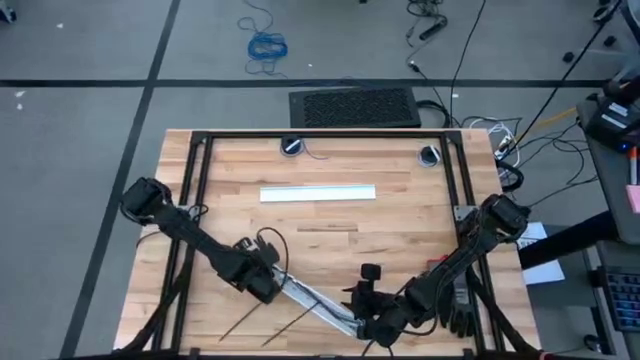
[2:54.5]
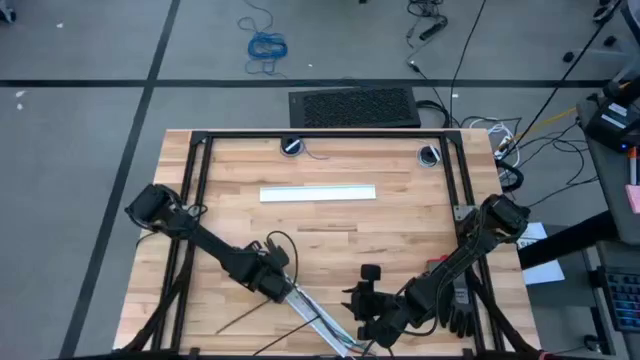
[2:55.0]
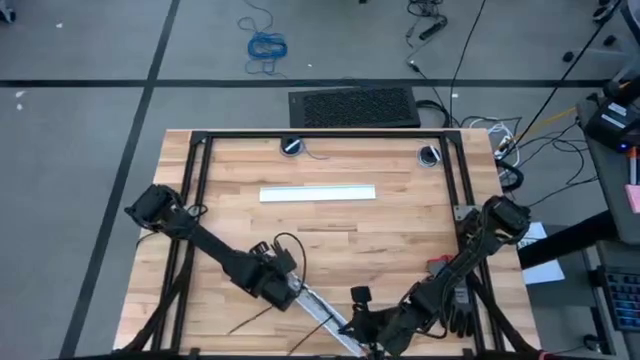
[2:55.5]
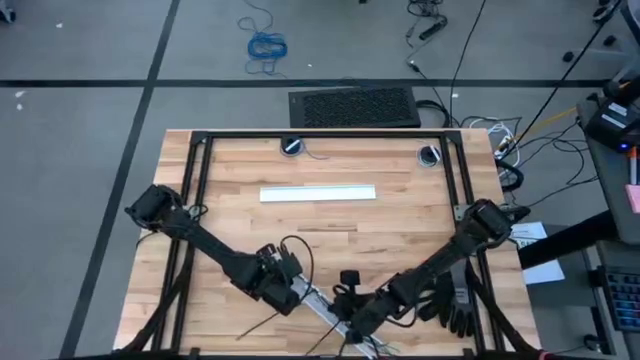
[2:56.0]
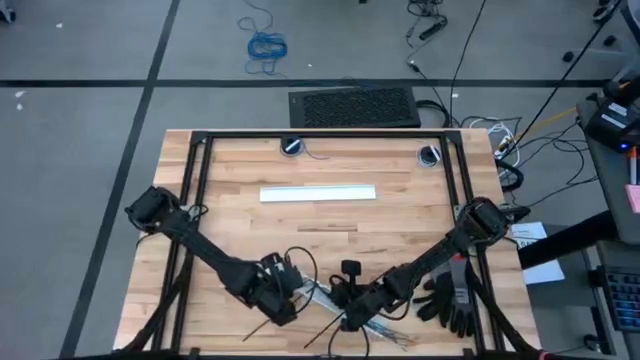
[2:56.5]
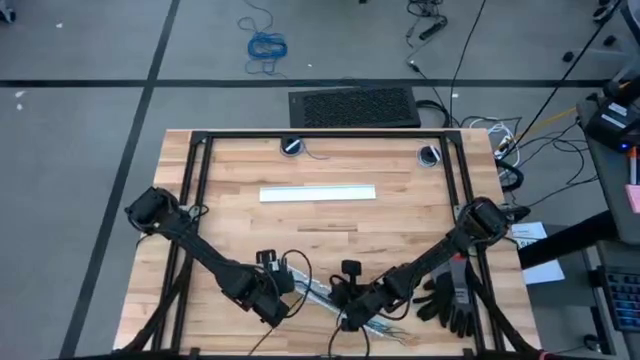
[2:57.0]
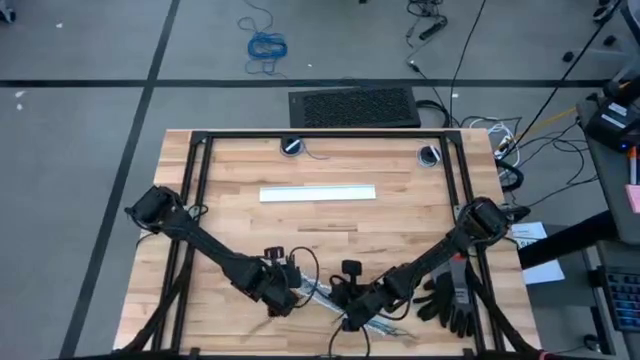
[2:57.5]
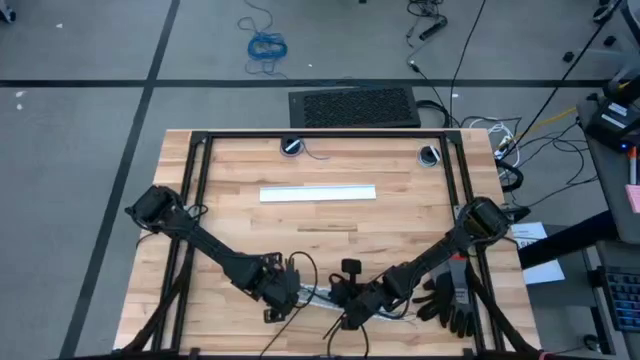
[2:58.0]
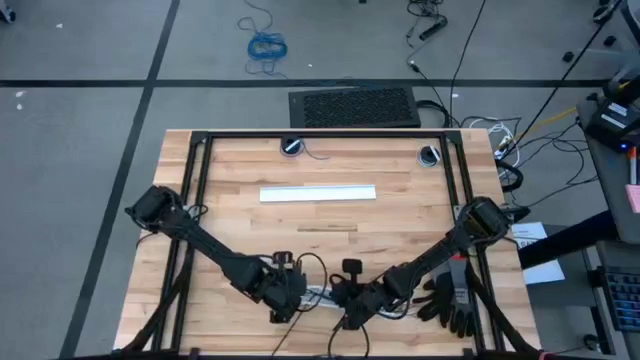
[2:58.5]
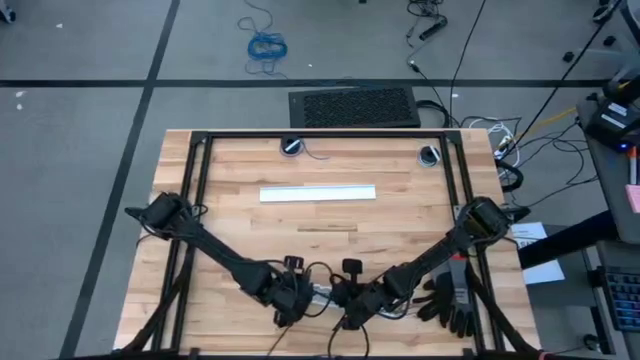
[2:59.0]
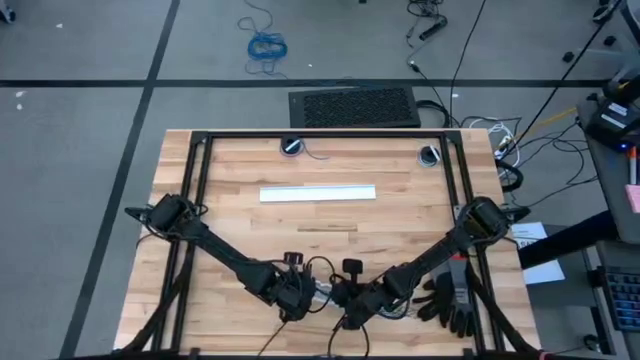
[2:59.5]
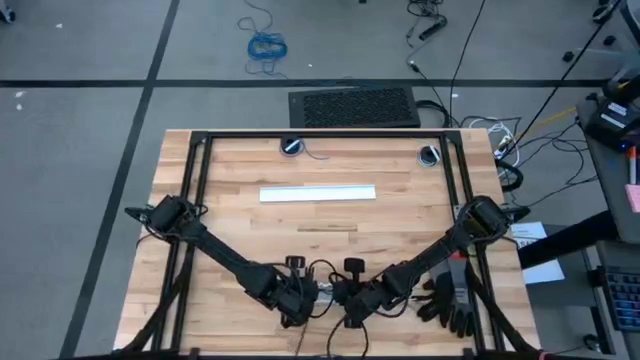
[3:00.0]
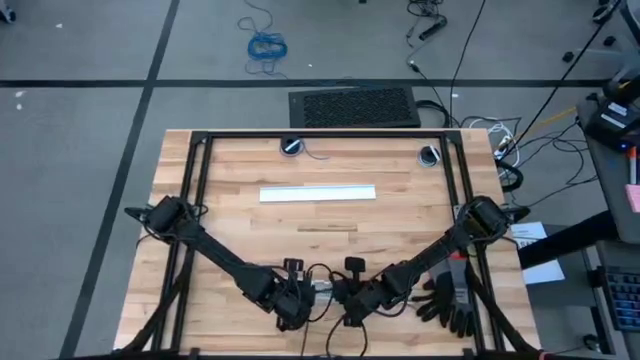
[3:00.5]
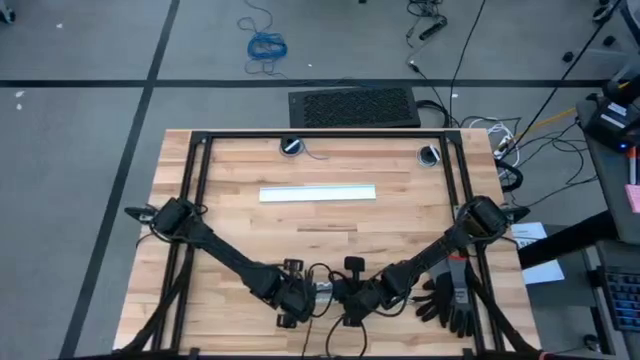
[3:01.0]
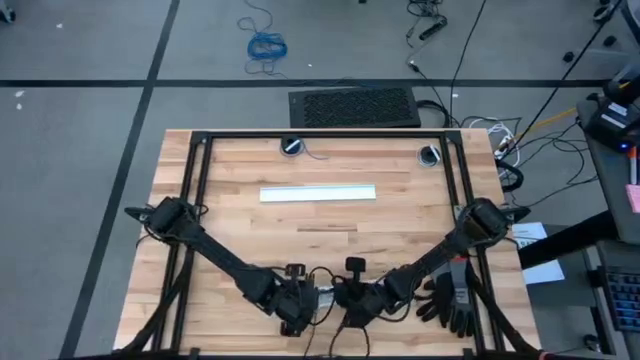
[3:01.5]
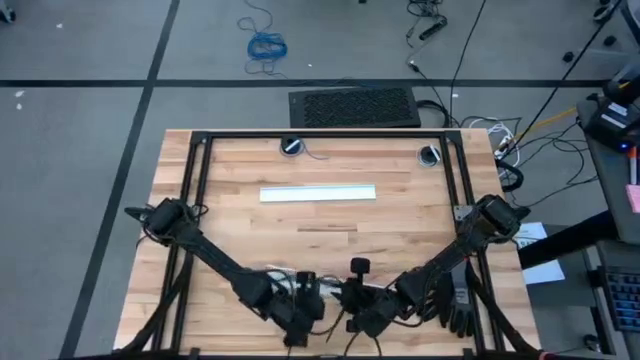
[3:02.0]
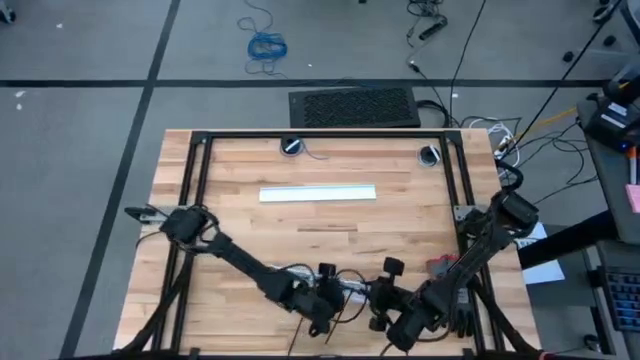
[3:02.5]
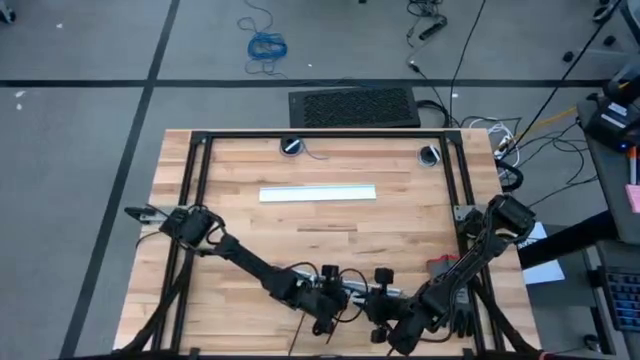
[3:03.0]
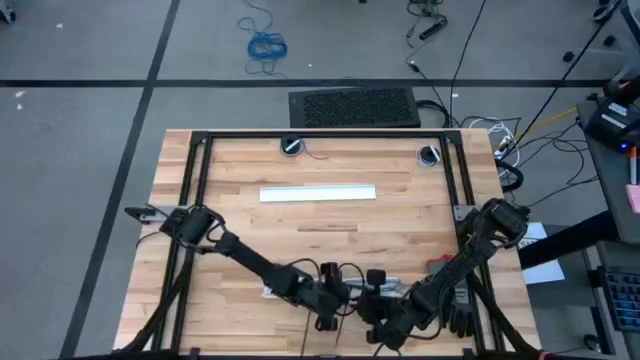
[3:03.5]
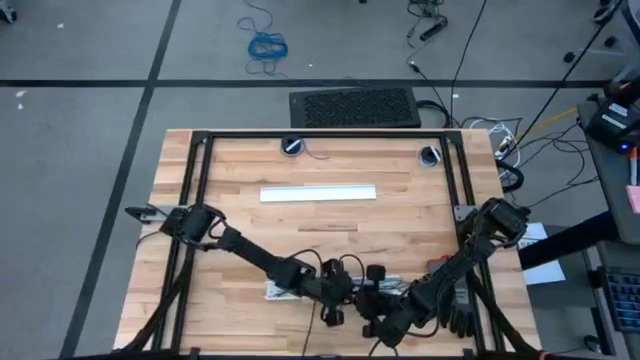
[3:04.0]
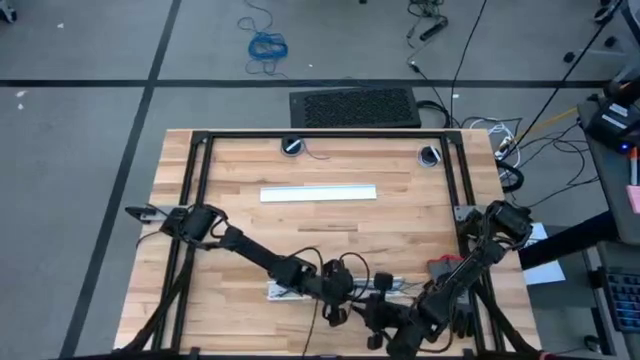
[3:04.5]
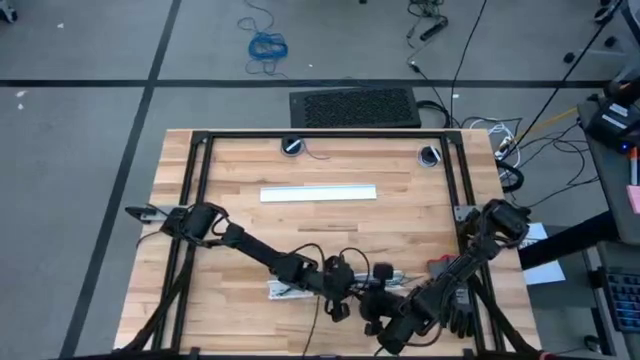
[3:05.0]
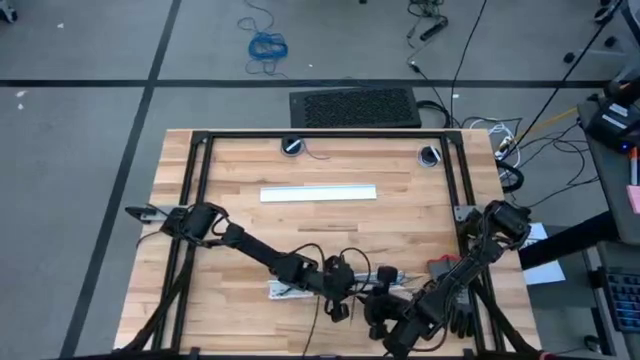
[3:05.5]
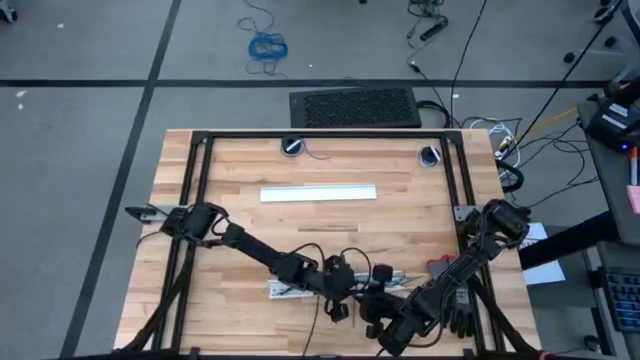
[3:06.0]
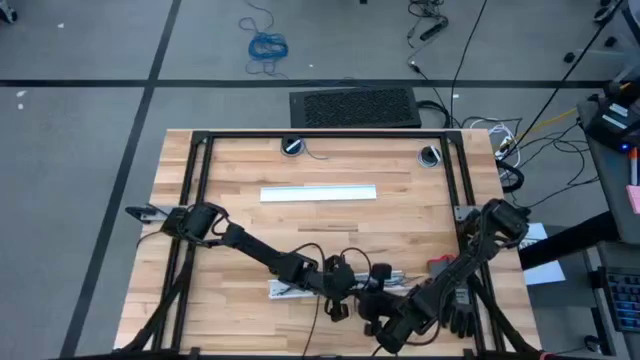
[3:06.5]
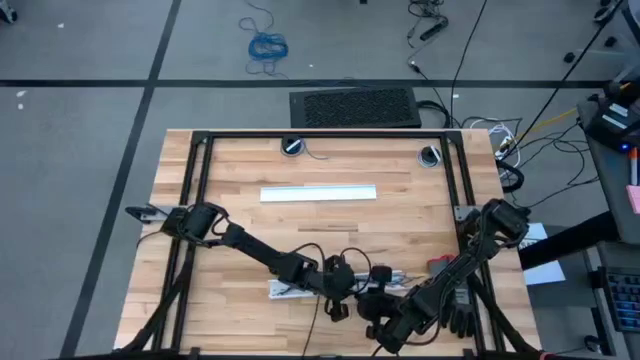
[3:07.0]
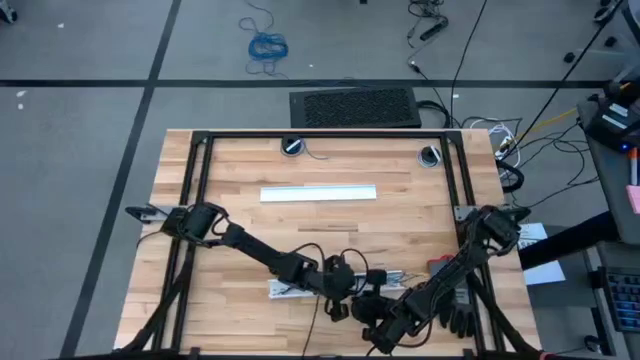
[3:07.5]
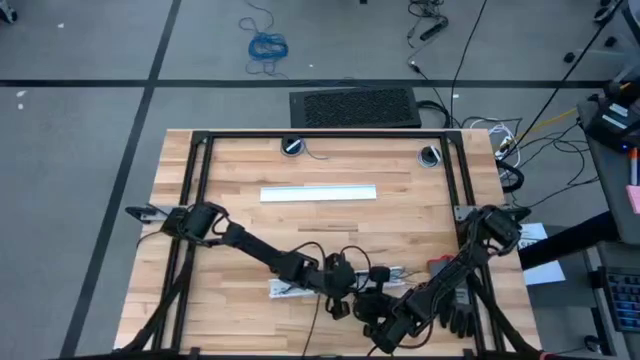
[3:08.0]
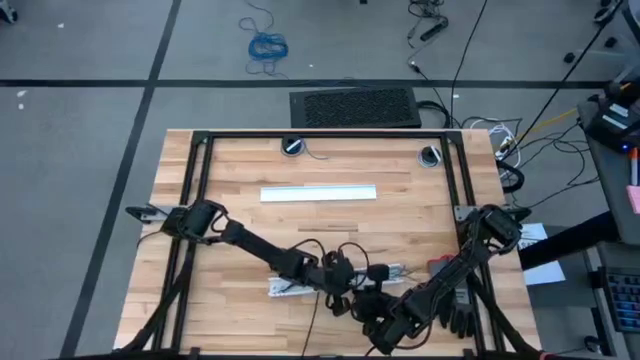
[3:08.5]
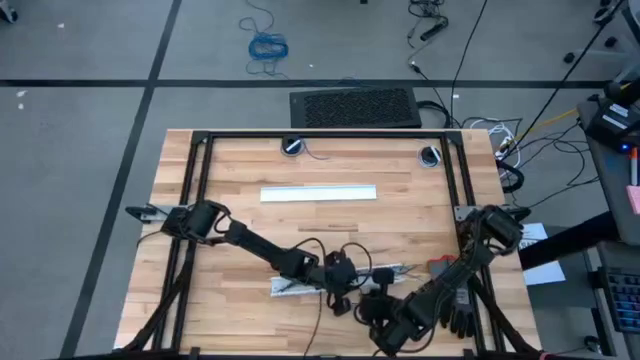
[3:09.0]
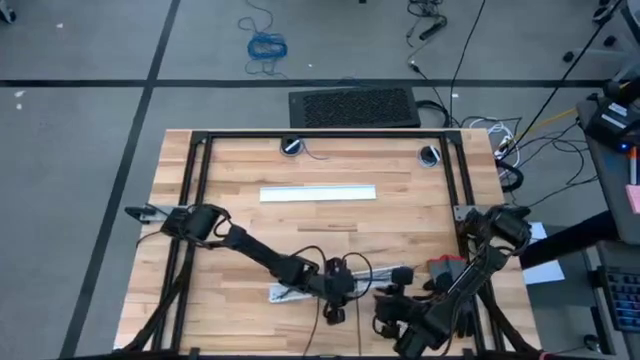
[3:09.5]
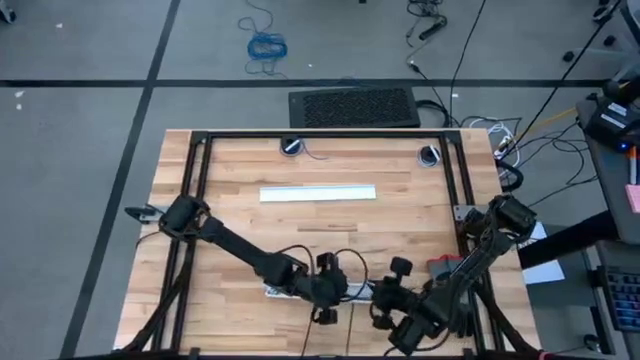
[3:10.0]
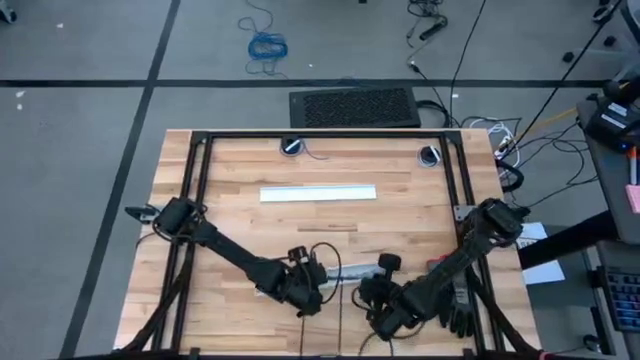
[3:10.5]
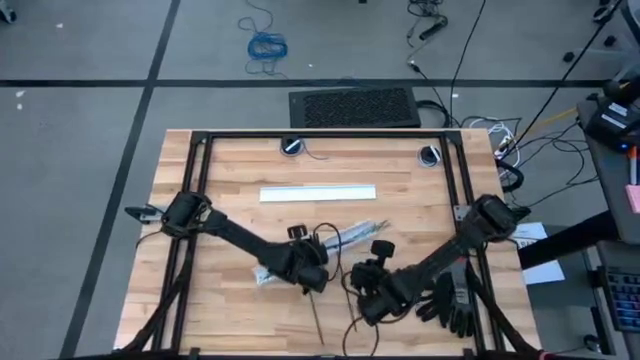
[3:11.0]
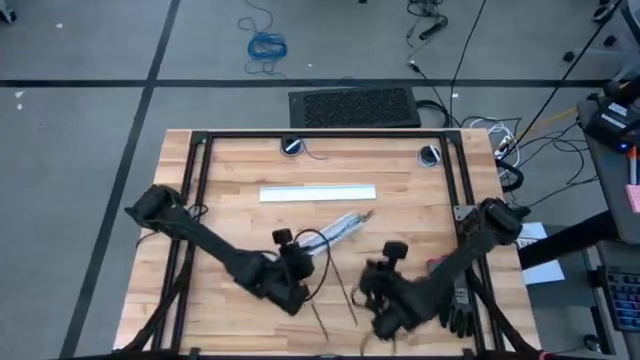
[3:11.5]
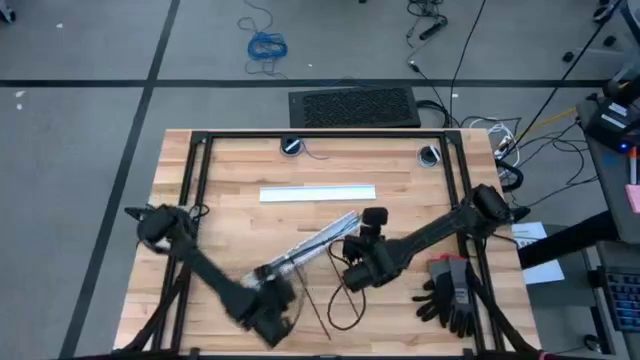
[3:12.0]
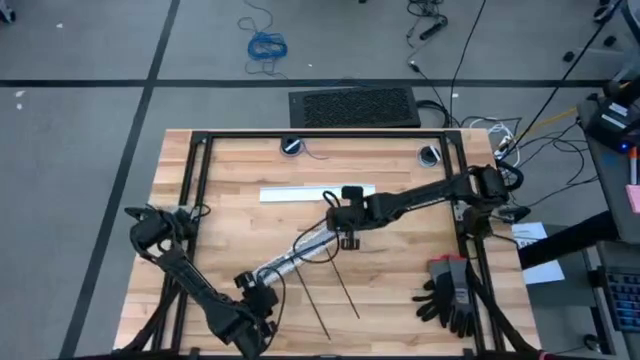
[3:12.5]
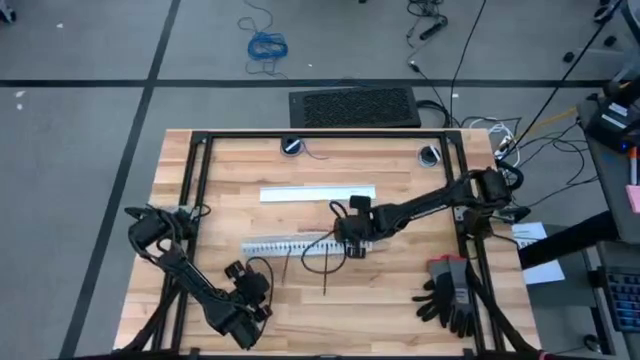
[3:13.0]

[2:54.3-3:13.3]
Task: Ziptie cables
Put the ziptied cables into the cable duct

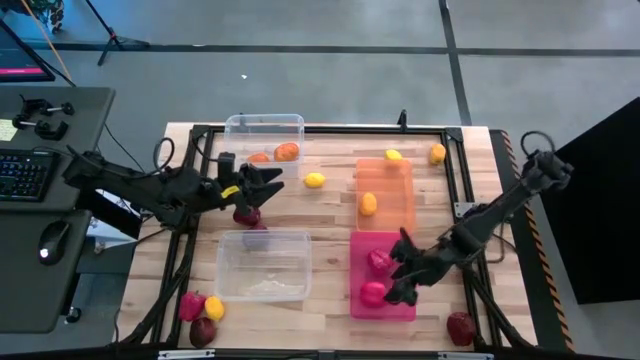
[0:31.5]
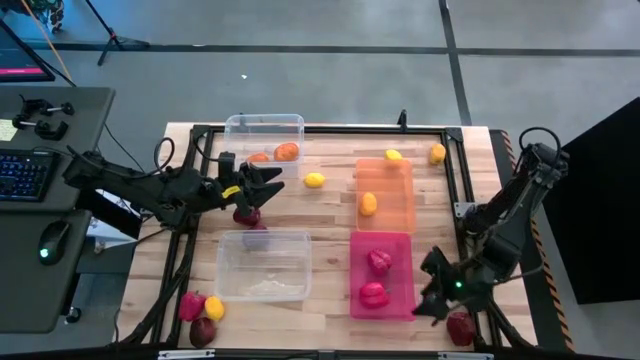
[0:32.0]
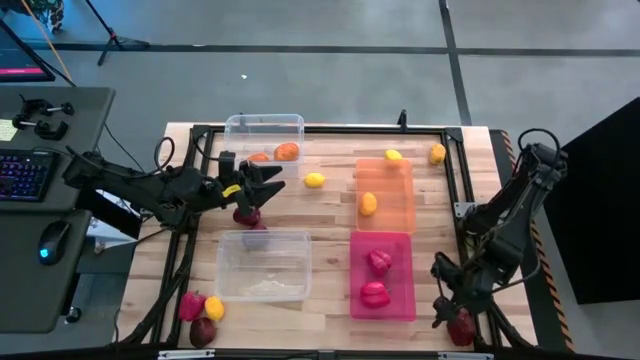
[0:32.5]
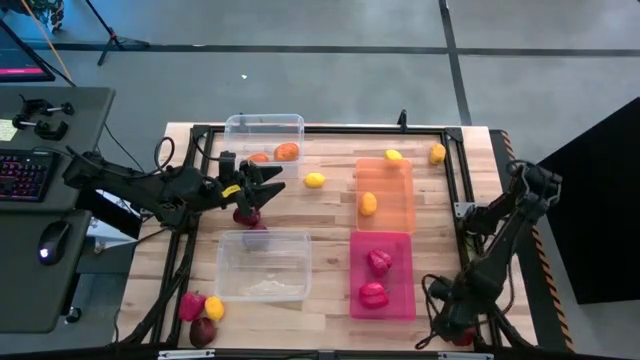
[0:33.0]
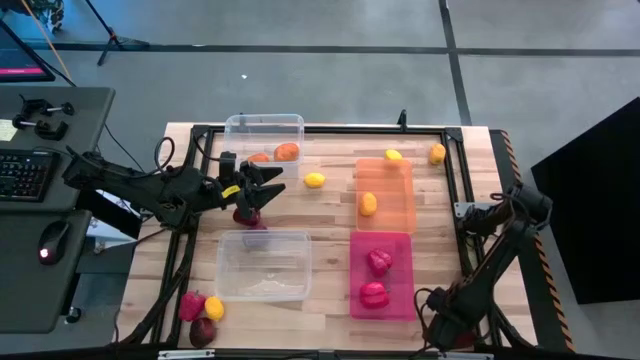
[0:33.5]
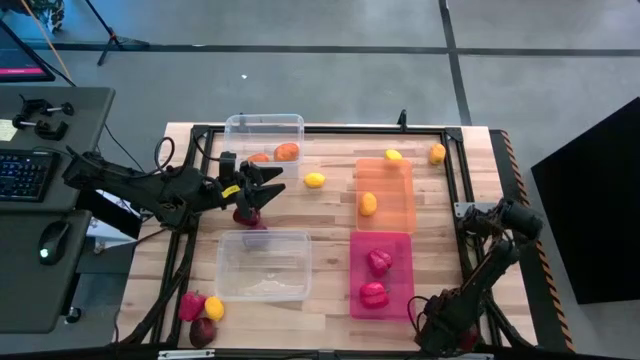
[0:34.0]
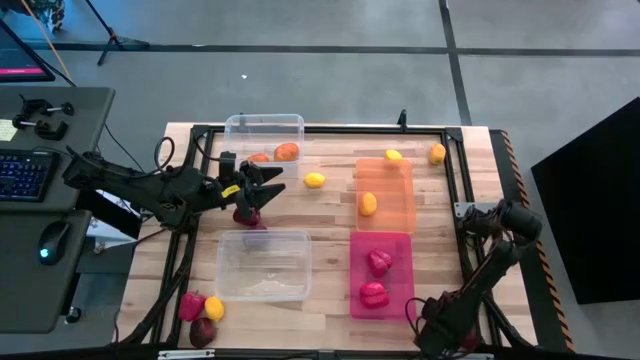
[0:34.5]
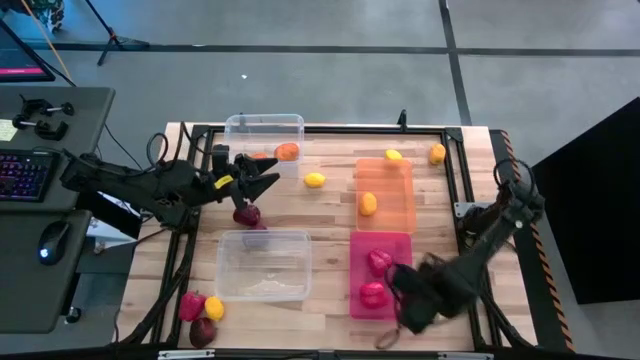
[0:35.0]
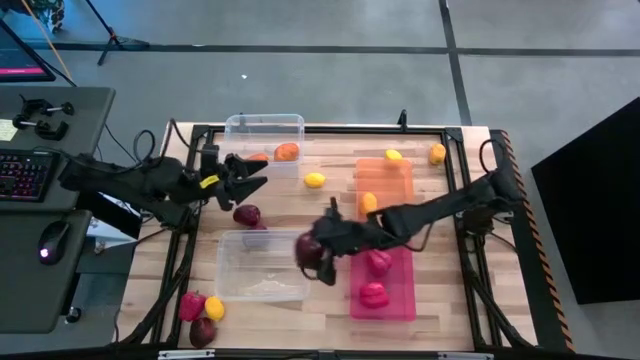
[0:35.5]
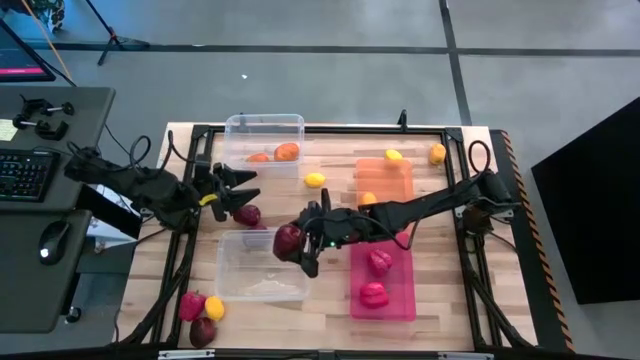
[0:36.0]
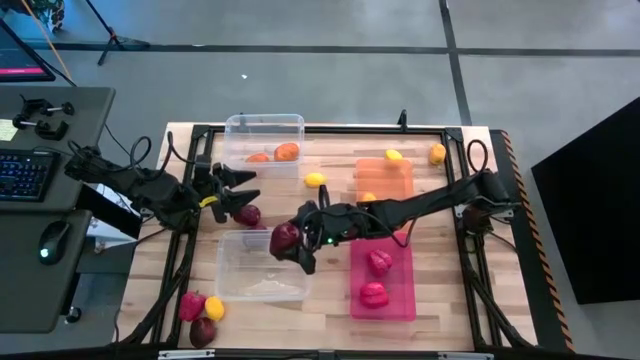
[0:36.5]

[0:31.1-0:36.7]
Task: Sort produce into baskets
Put the red apple into the bottom transparent bin
